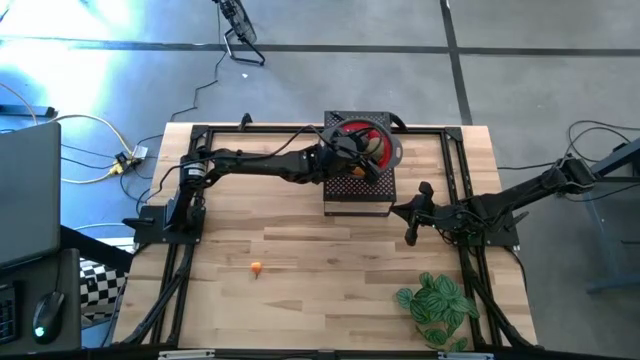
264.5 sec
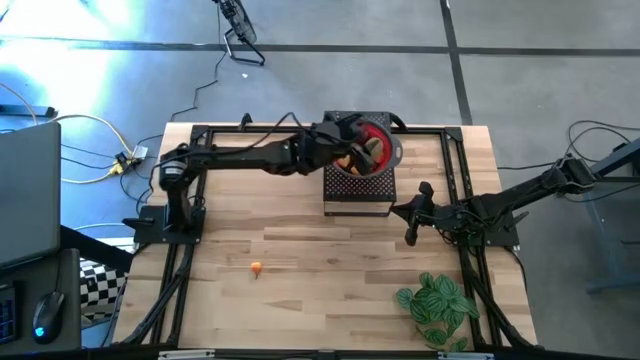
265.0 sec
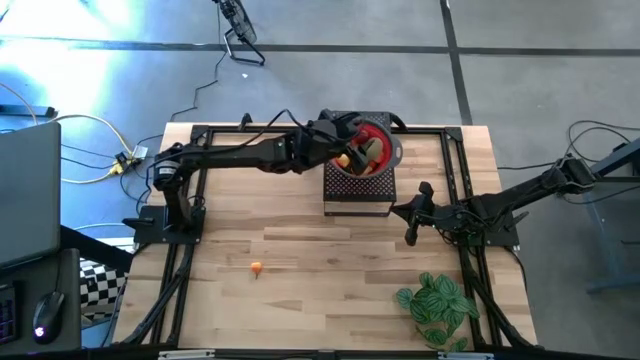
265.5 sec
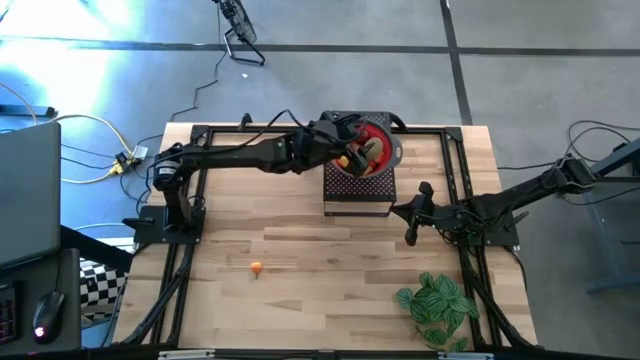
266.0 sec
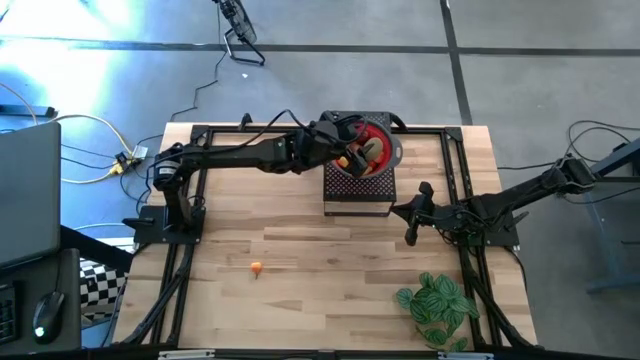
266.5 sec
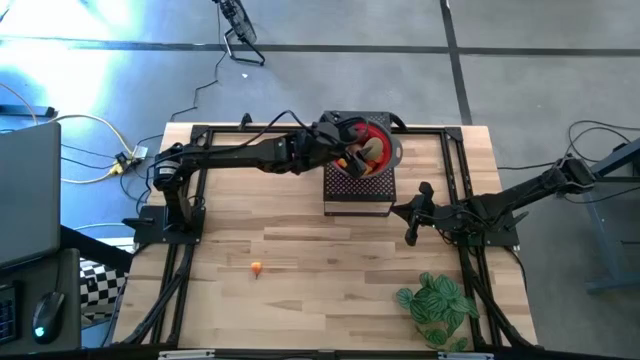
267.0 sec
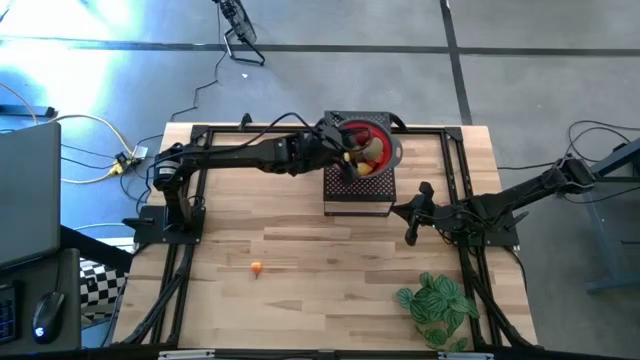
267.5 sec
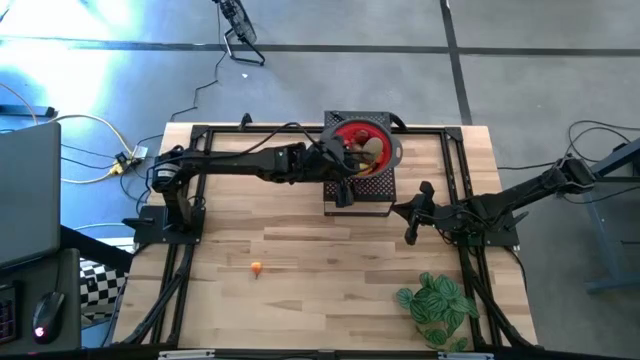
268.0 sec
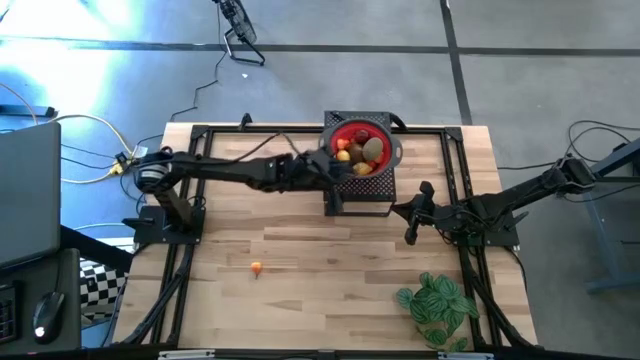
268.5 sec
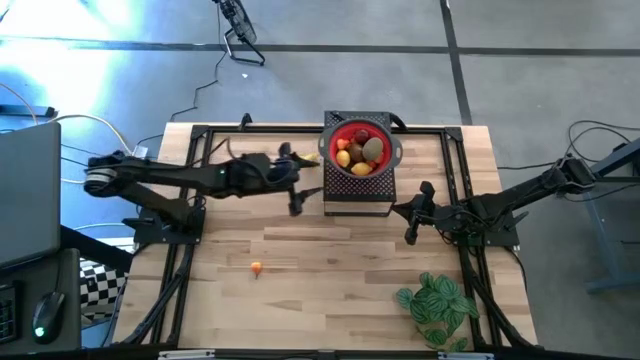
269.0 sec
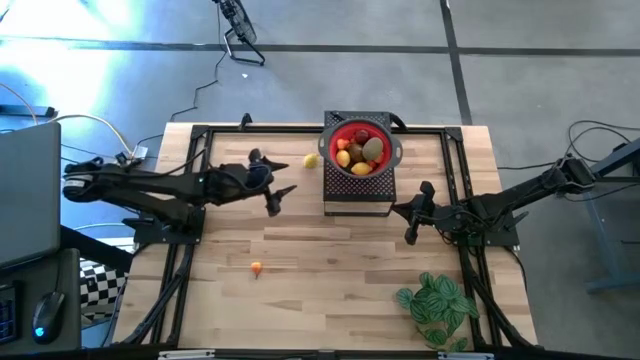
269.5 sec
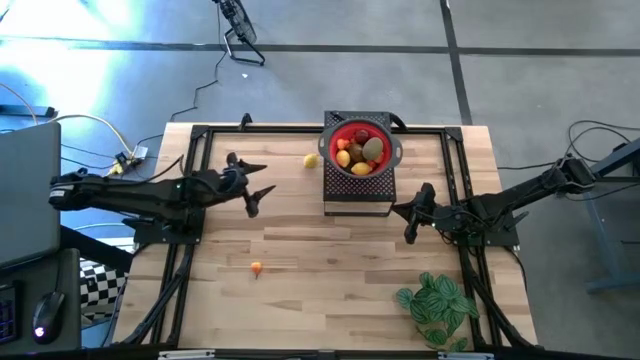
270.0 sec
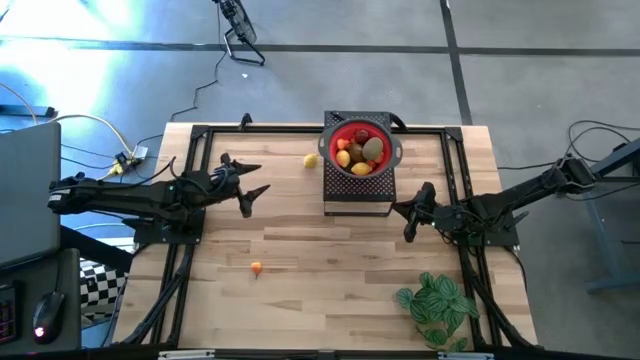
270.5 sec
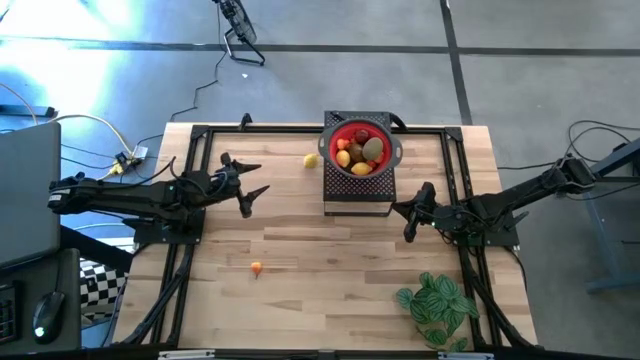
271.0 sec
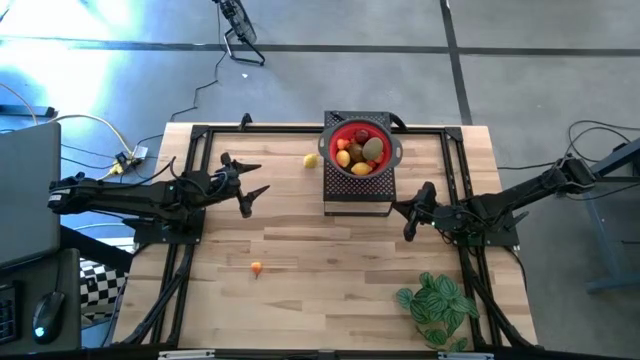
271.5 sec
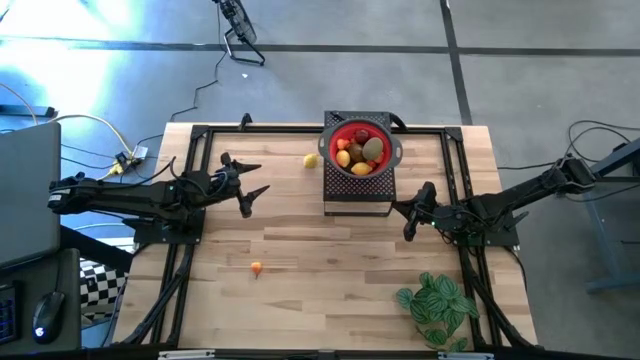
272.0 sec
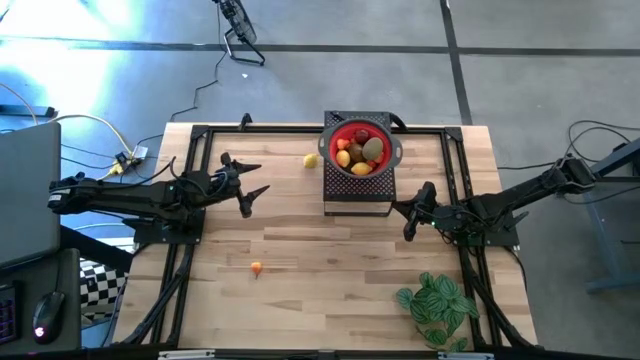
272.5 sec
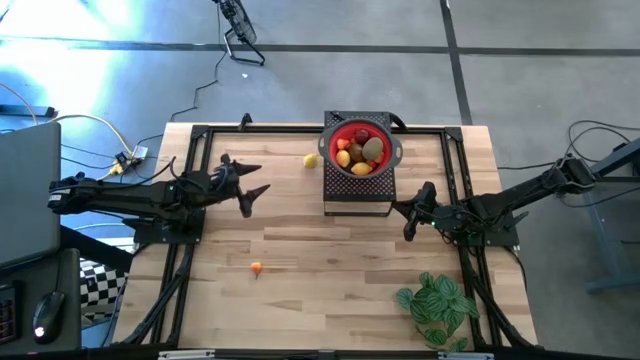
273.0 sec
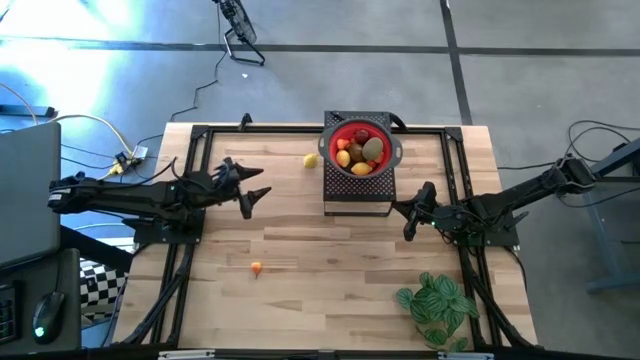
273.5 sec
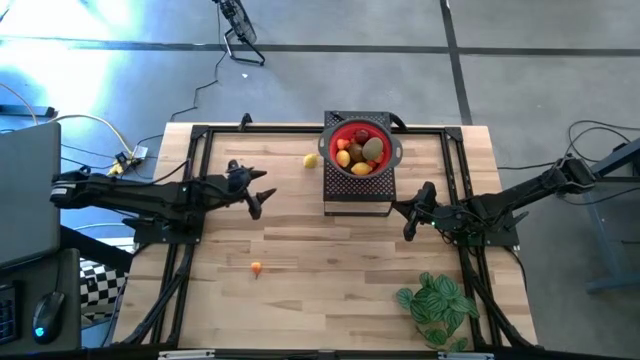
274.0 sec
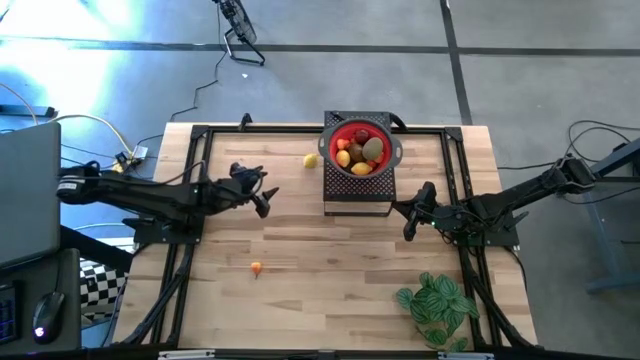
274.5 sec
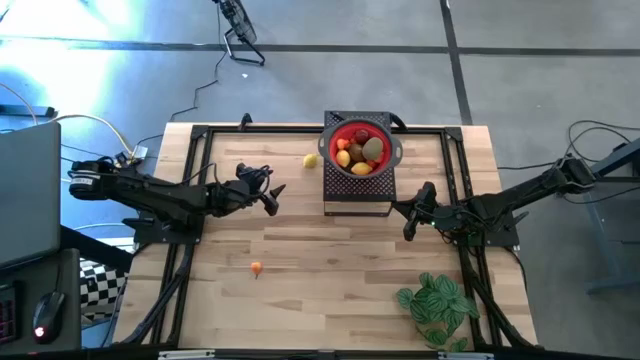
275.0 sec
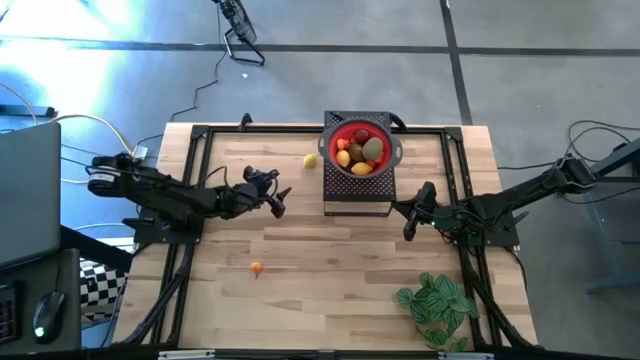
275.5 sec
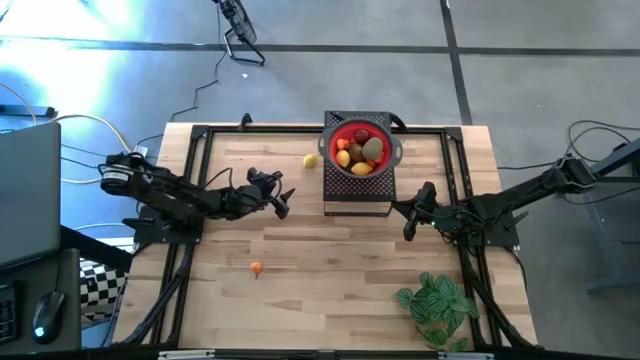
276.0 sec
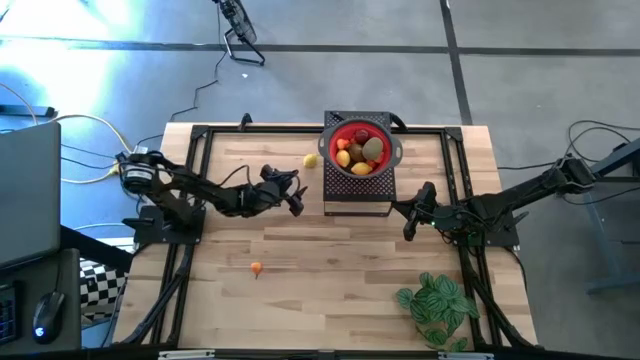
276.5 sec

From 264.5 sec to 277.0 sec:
Task: Pick & Place Fruit
Put the yellow lemon into the red strainer bowl on the shelf

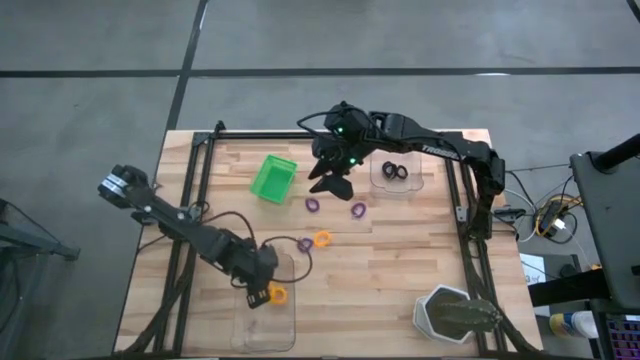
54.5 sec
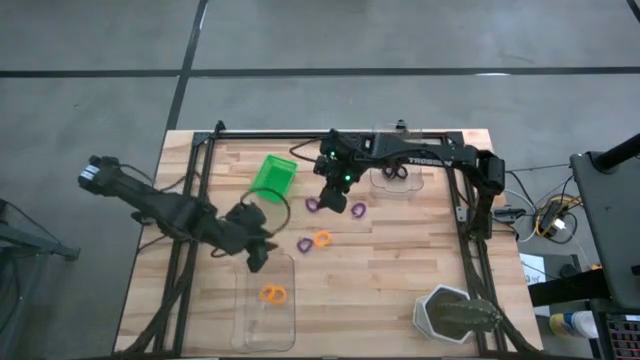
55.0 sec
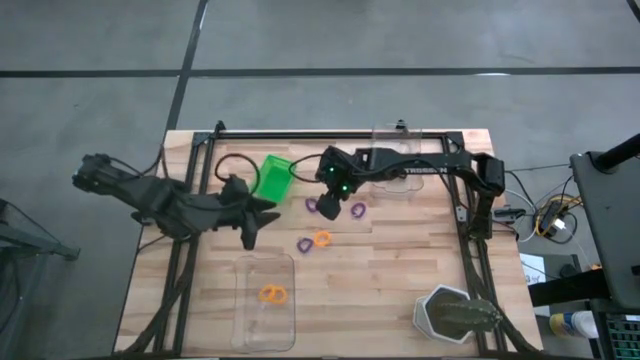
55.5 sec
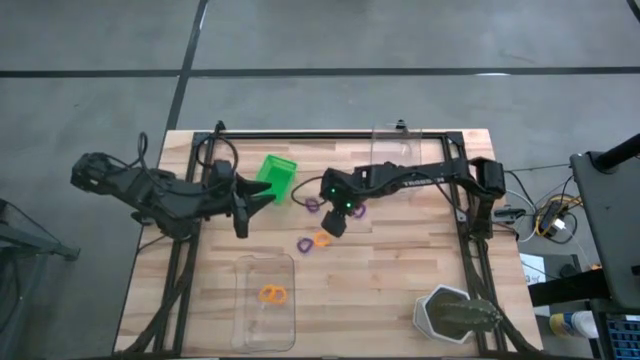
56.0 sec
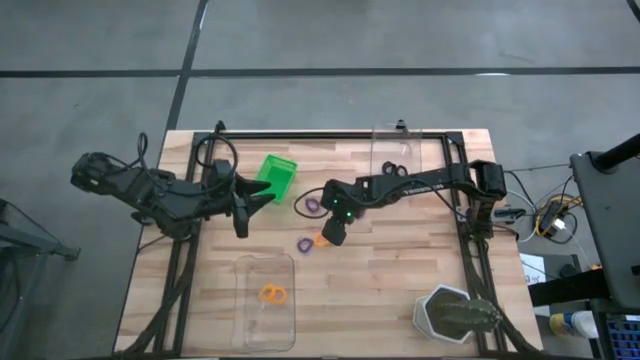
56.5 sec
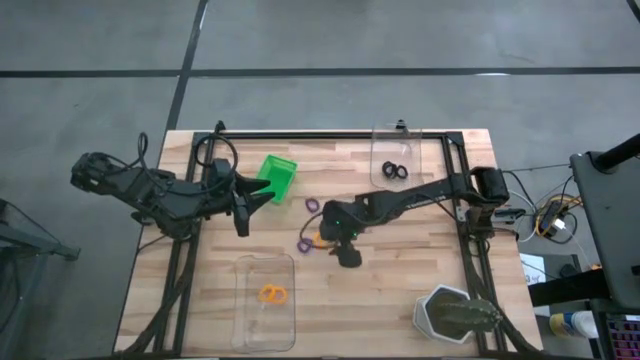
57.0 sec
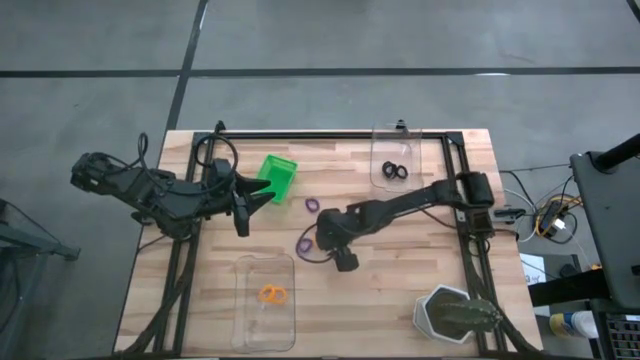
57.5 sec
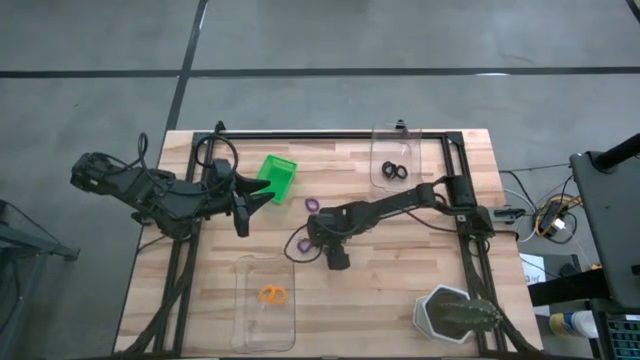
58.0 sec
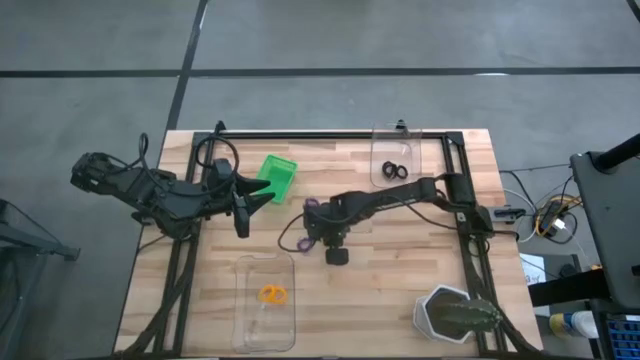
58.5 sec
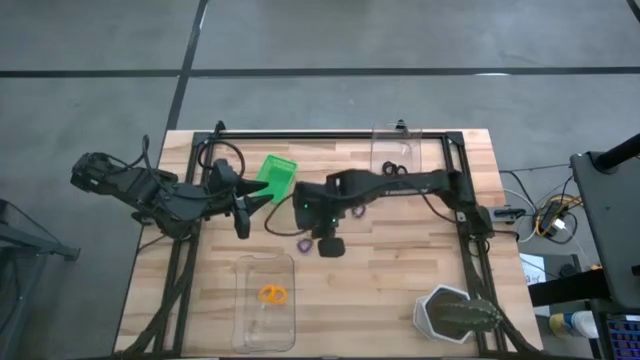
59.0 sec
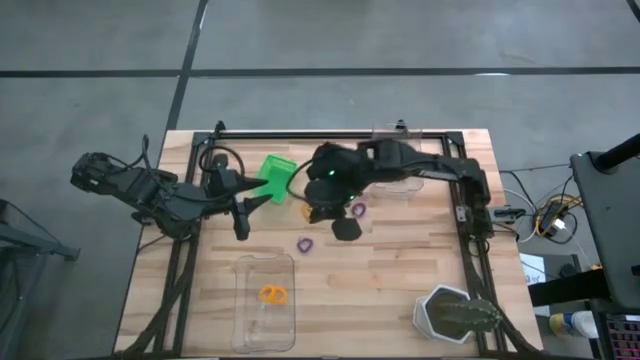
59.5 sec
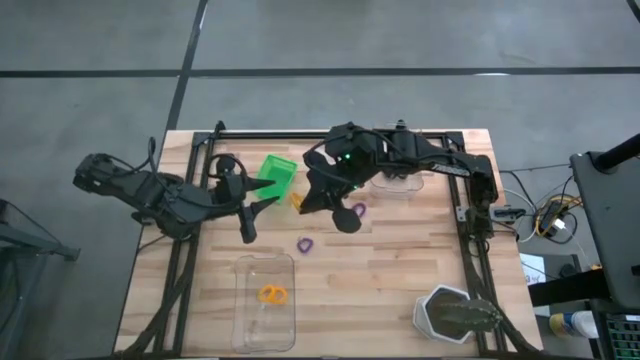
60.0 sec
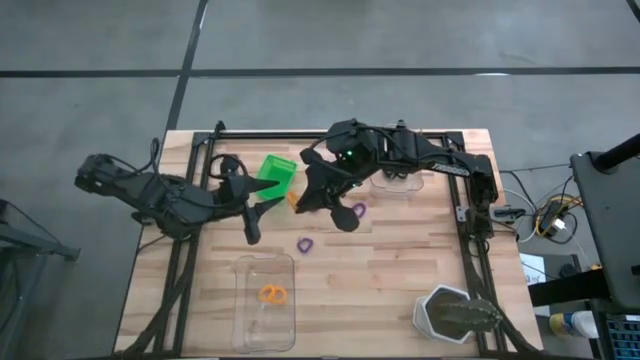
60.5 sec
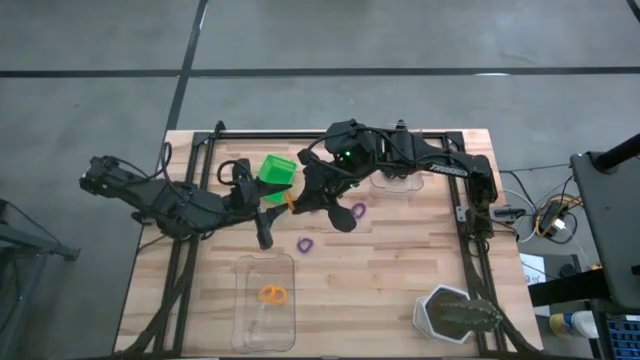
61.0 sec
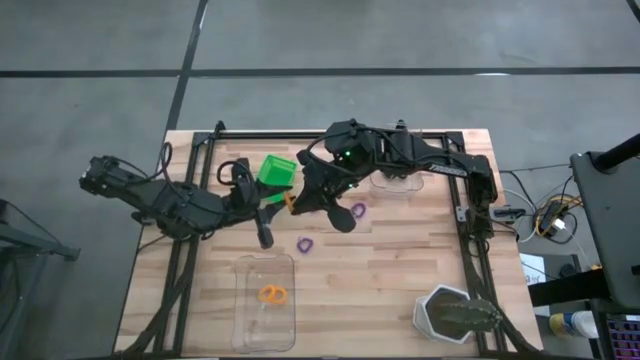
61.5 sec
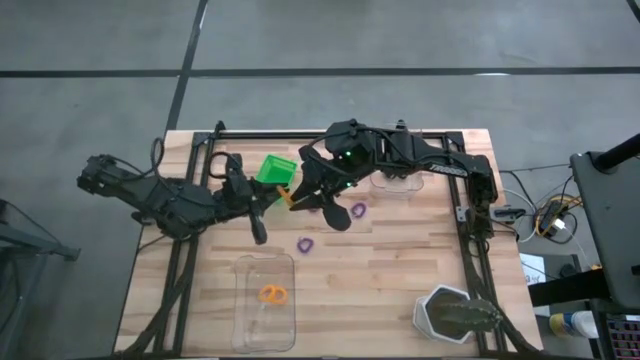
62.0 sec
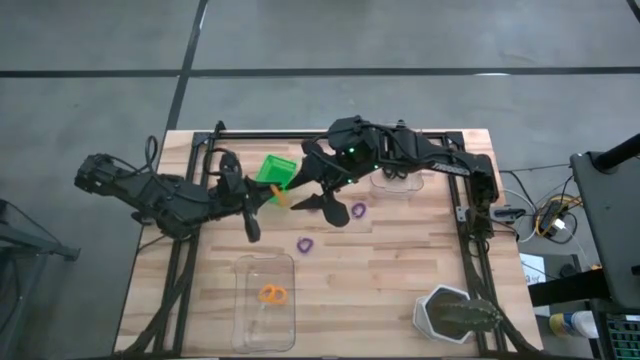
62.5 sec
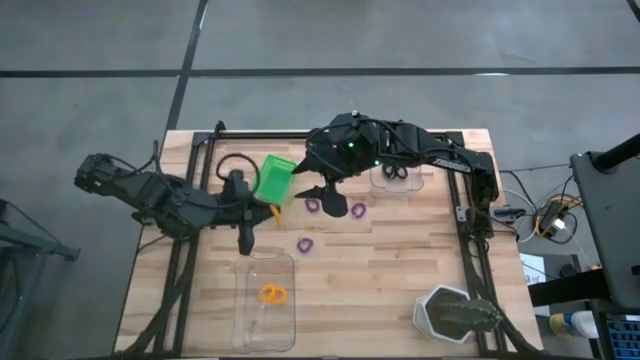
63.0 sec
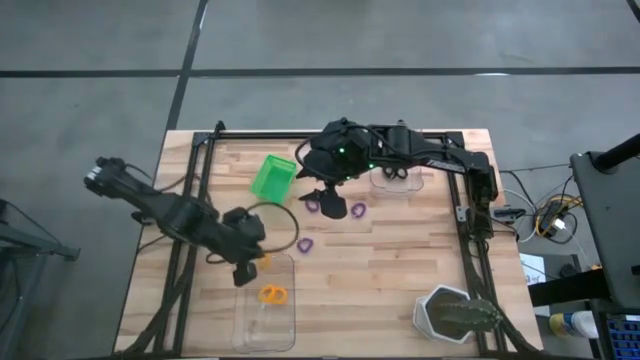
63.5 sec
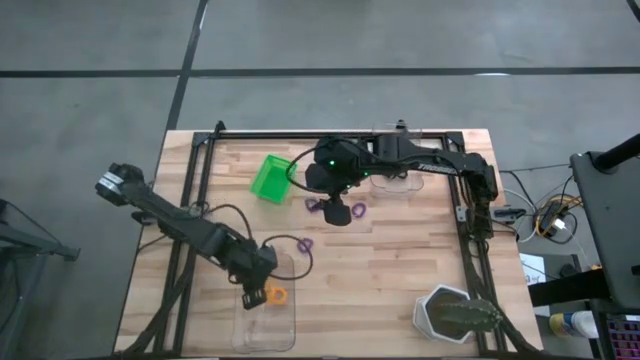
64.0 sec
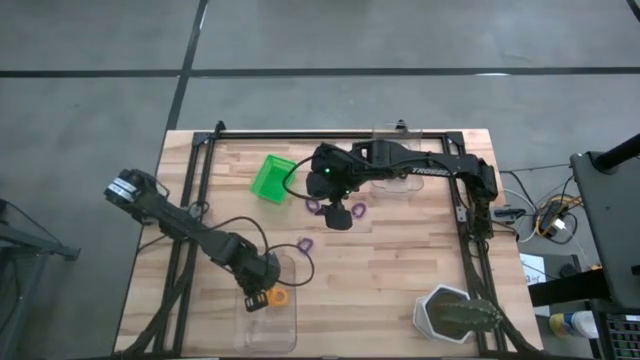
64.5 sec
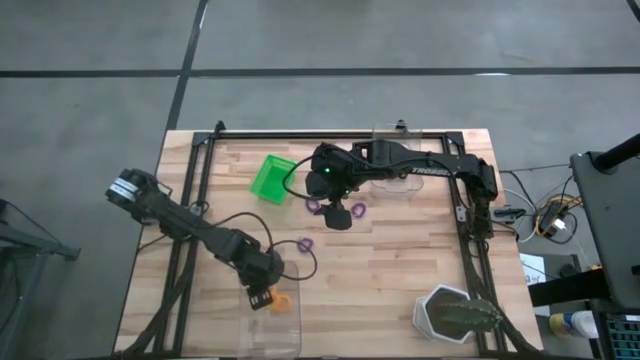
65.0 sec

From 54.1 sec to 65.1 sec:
Task: Sort spring keychains
Put the yellow spring keychain into the bottom transparent bin
